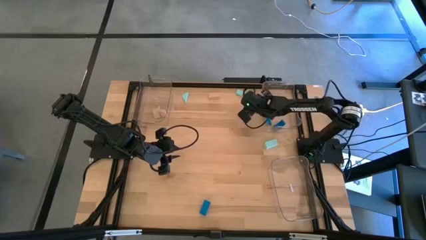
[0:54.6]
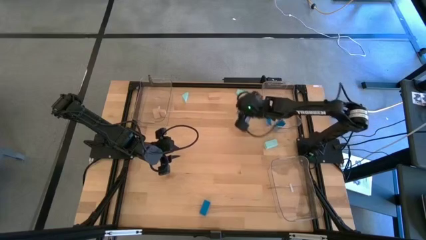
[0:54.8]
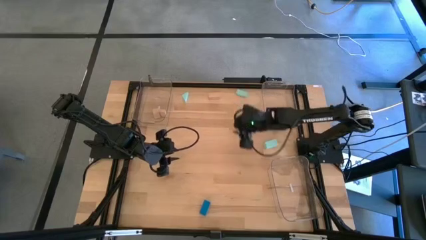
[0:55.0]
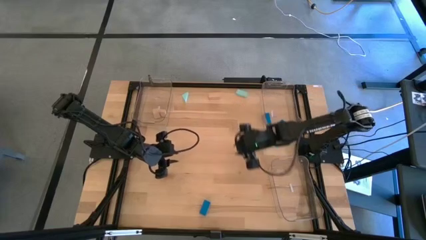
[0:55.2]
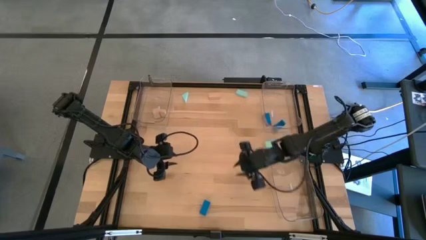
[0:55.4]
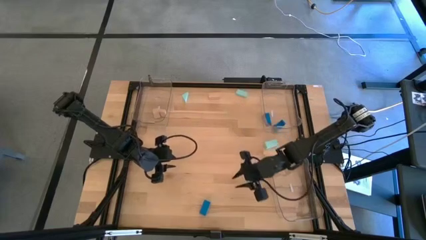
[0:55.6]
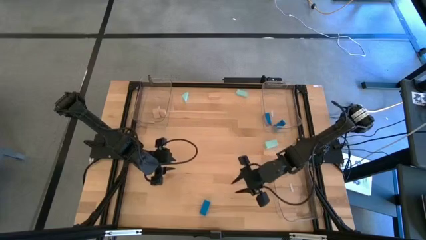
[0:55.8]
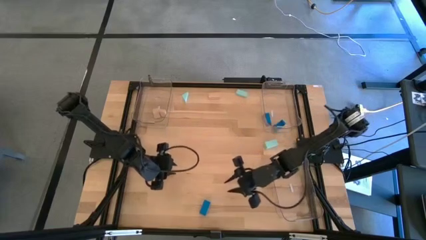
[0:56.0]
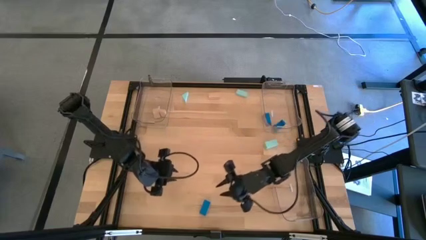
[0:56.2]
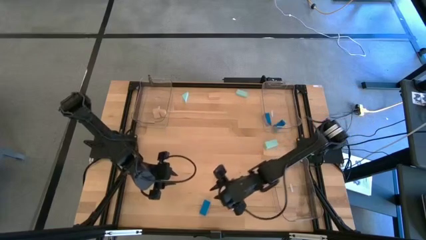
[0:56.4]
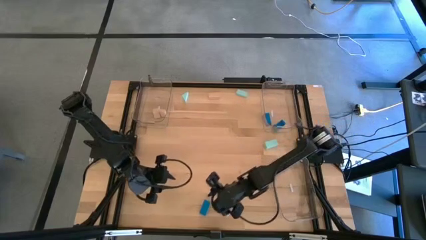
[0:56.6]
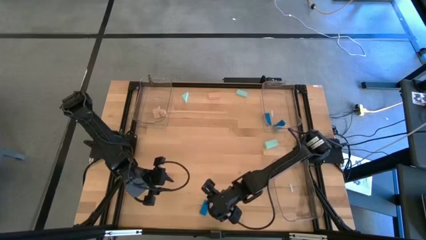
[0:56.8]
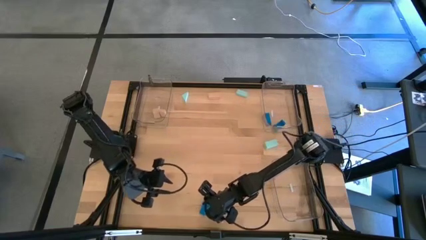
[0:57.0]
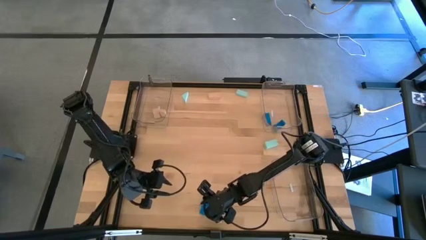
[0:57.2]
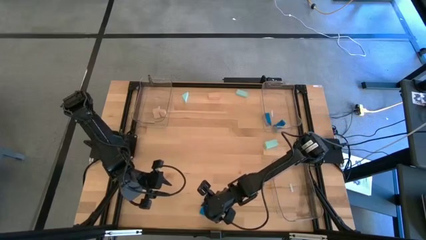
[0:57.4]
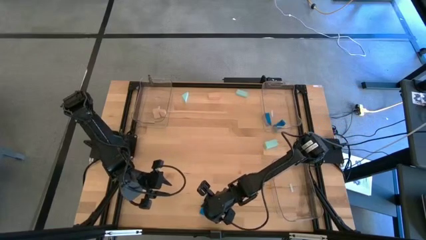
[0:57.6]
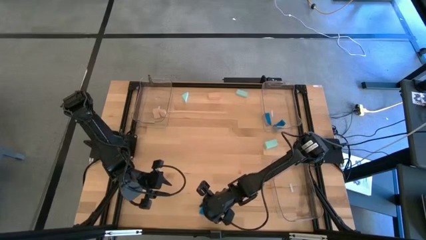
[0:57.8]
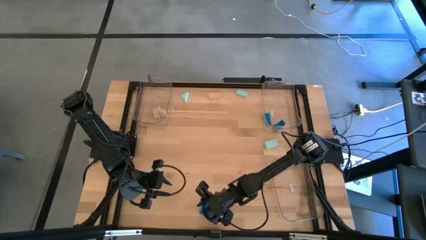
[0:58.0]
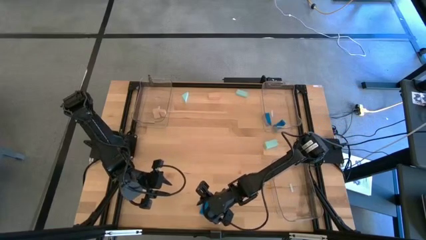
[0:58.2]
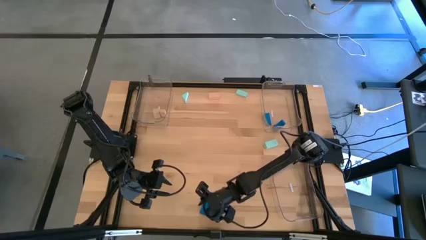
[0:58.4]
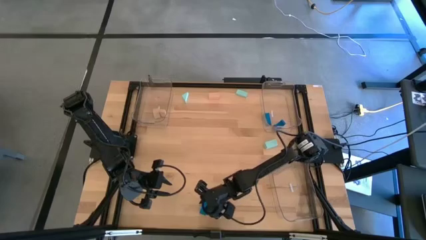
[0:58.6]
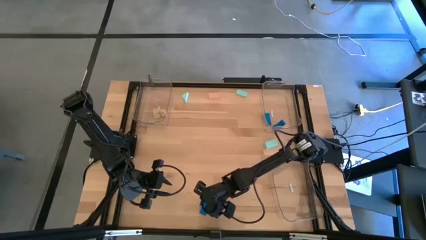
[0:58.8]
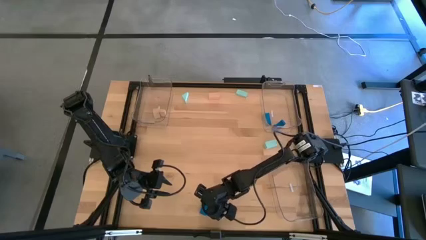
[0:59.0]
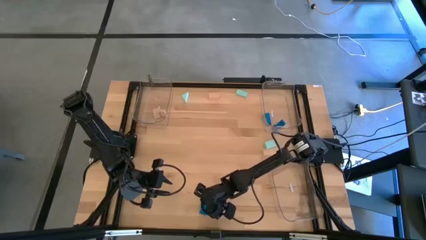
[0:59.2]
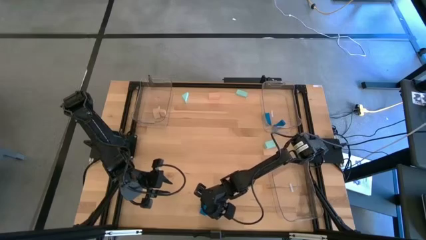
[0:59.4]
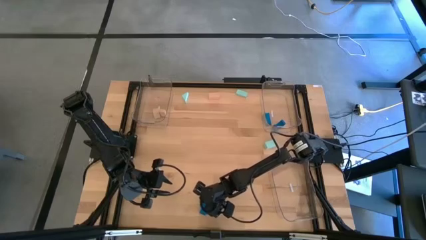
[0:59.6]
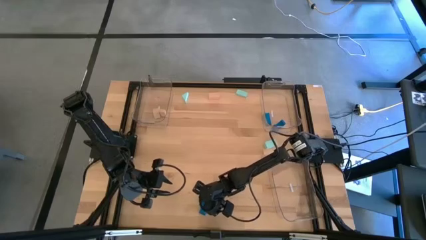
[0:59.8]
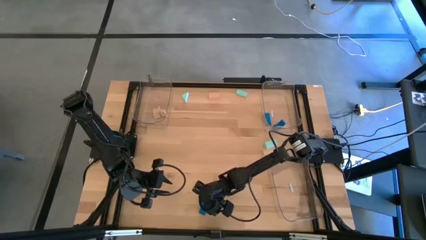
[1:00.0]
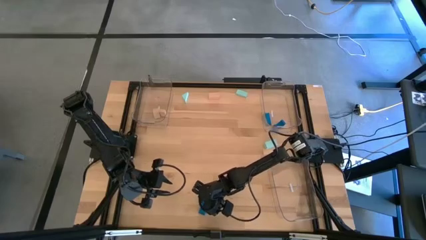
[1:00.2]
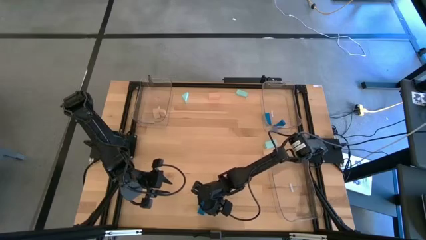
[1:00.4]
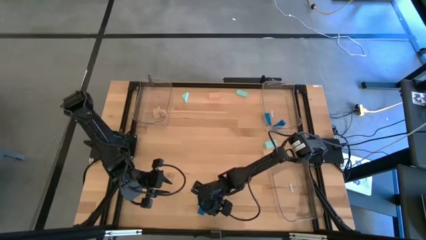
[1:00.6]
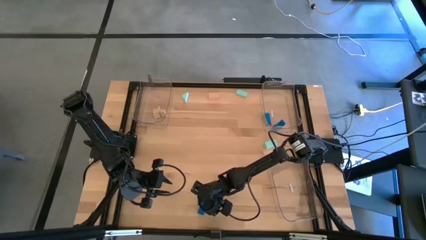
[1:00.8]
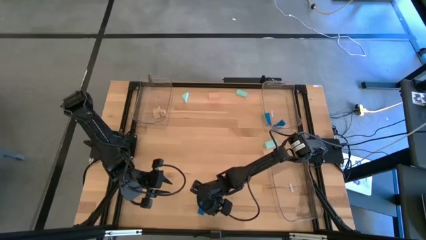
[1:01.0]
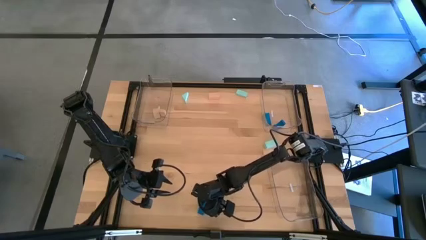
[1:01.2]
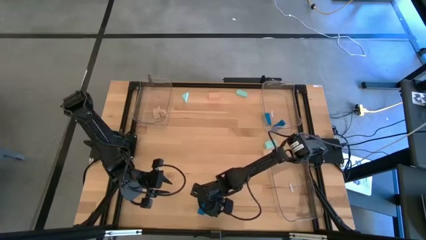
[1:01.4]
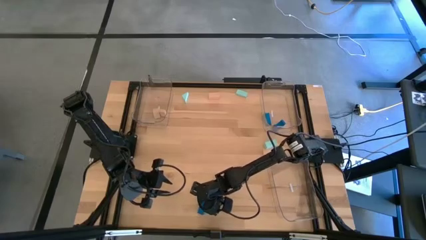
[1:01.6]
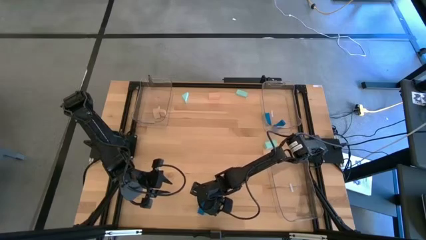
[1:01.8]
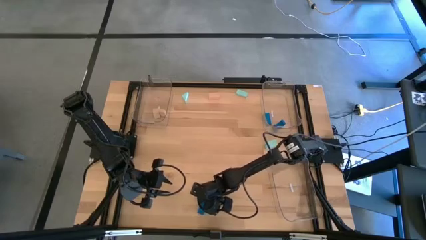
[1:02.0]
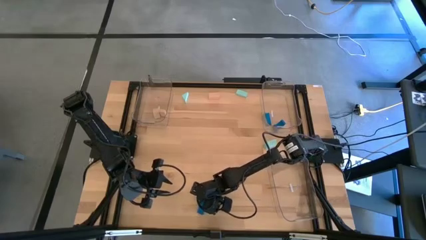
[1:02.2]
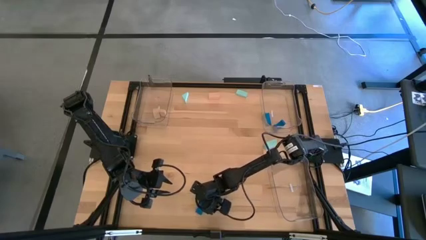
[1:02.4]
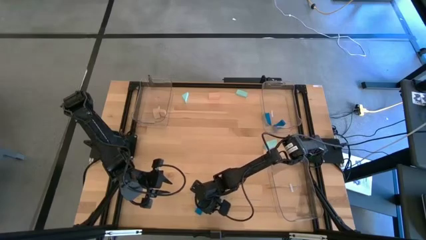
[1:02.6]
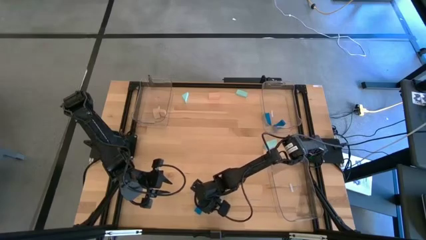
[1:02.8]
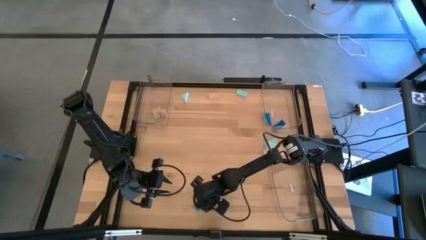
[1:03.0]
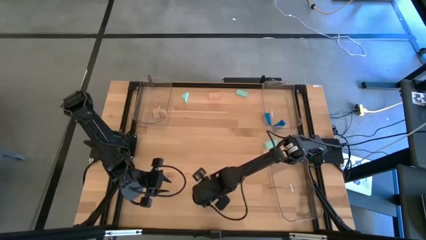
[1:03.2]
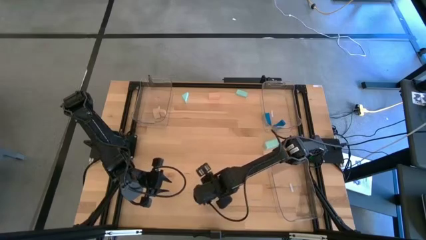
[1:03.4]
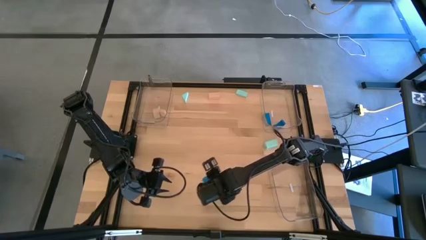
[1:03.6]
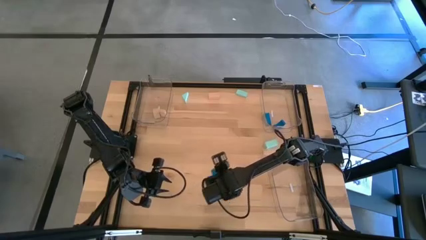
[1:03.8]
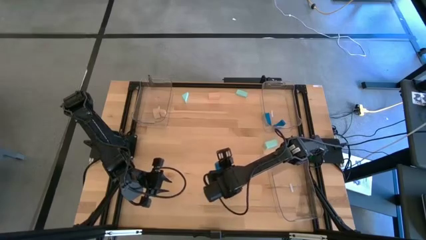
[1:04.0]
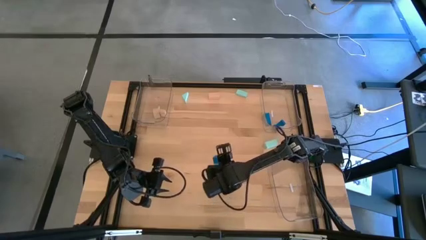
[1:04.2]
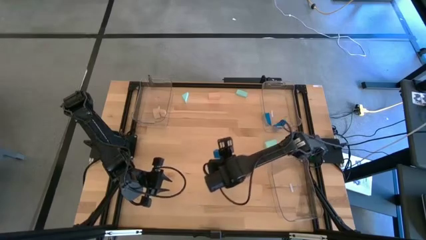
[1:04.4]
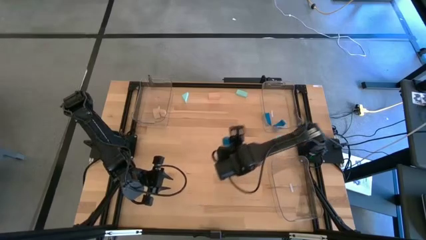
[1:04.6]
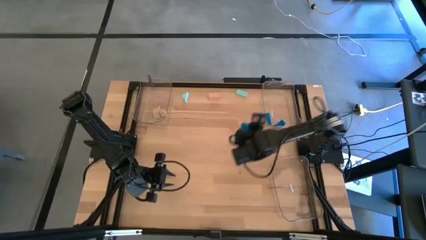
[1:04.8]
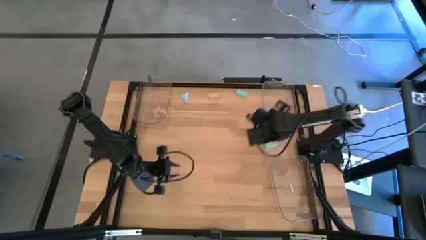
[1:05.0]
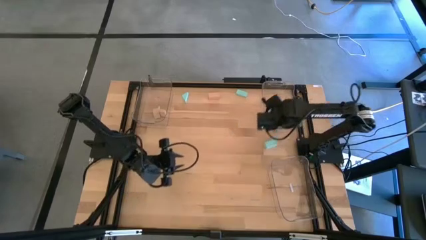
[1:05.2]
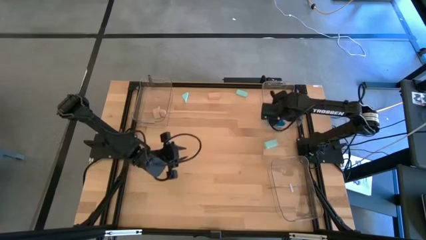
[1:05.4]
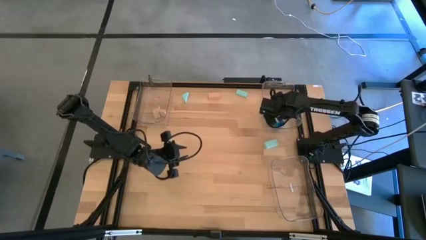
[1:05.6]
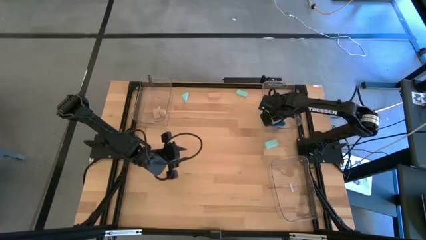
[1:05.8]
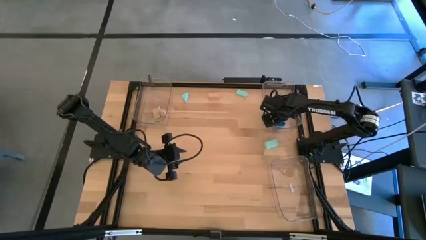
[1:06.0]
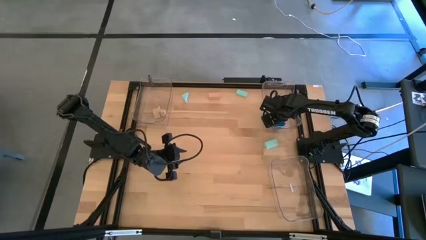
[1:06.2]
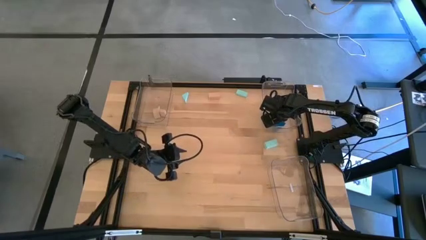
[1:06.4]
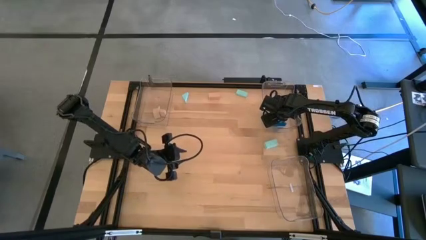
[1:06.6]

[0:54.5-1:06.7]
Task: Sort & place blocks by color
Put the blue block into the top right transparent bin

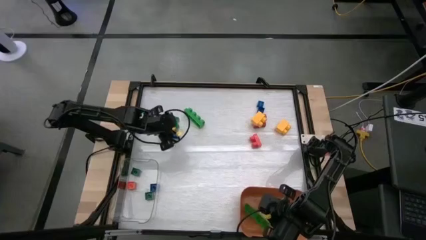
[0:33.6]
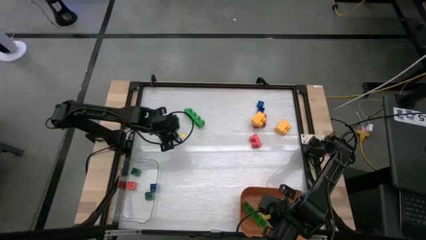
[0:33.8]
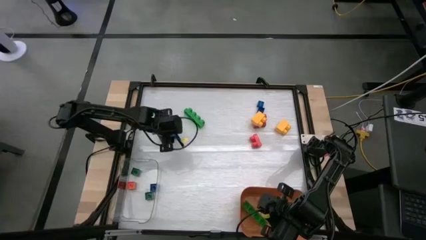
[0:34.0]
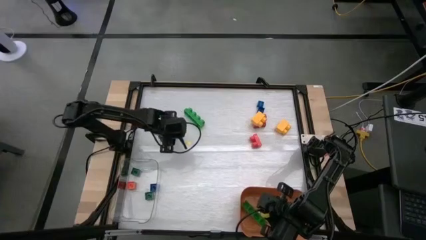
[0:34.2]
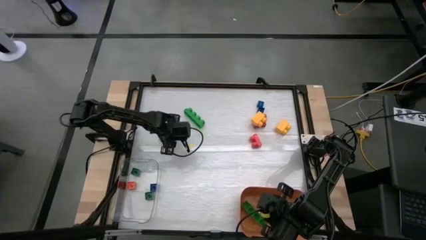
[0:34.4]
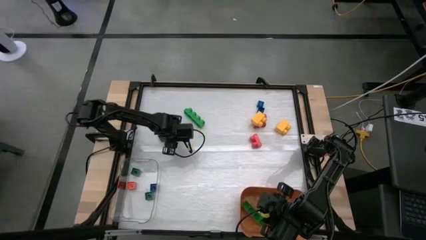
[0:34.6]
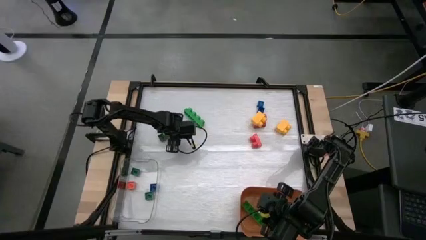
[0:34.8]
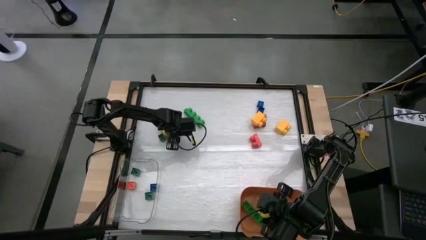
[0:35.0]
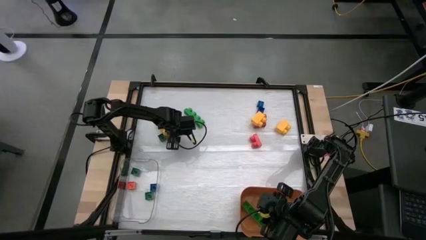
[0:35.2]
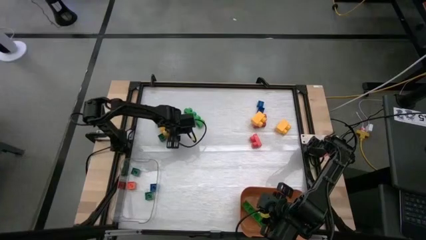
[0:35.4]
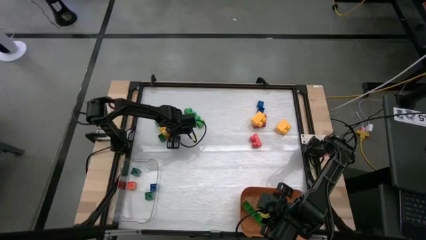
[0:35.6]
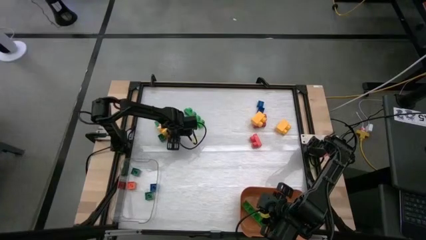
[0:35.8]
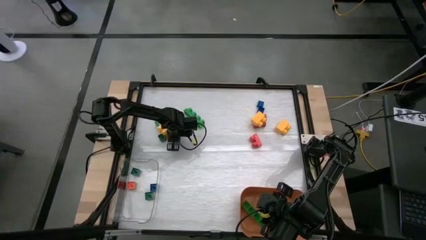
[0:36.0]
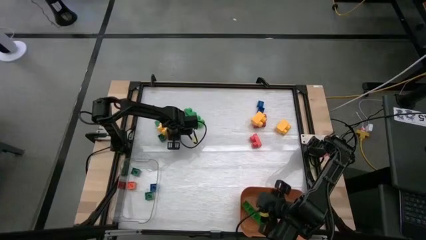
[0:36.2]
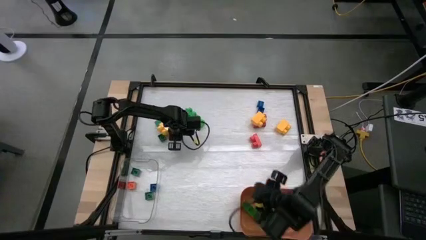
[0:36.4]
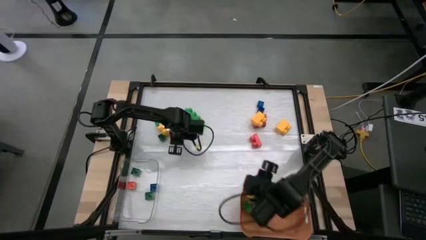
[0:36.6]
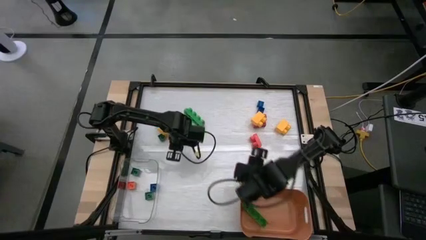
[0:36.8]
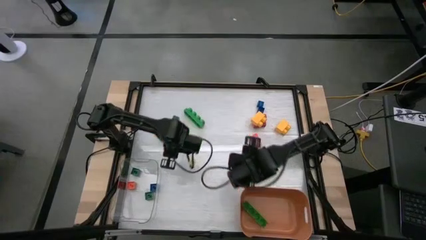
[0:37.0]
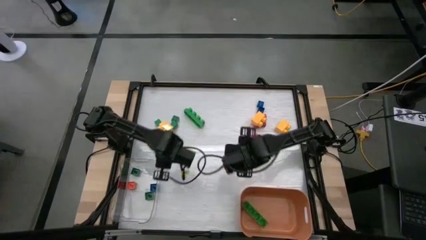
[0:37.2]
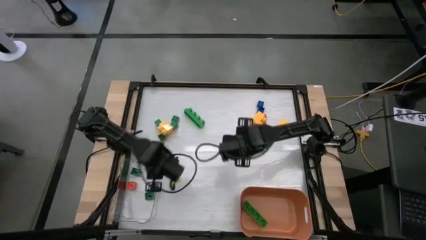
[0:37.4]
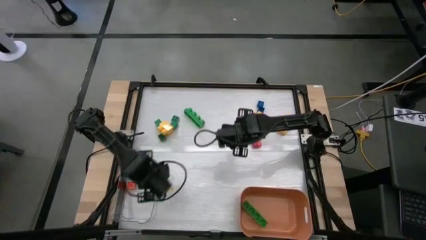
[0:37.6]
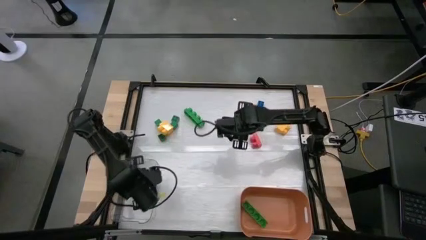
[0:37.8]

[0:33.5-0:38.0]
Task: Sort blocks by size
Put the small blue game piece into the transparent bin
